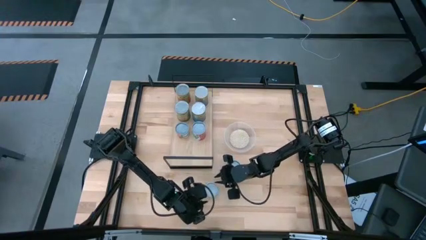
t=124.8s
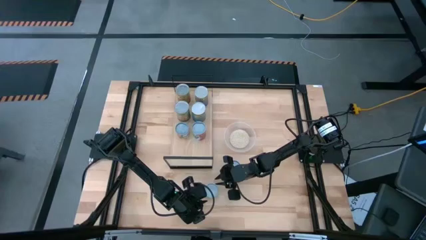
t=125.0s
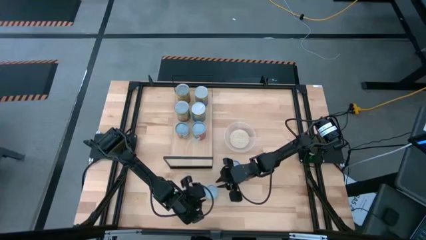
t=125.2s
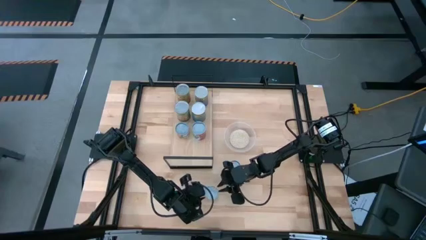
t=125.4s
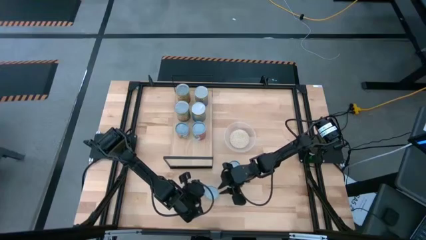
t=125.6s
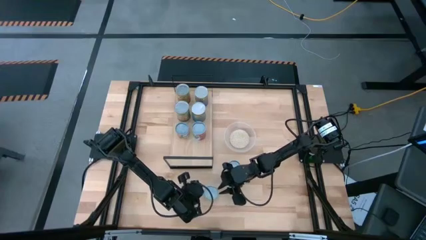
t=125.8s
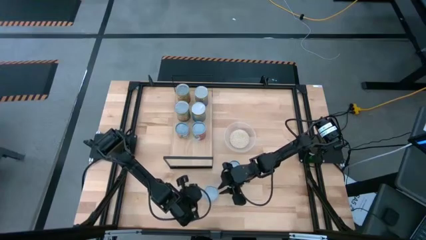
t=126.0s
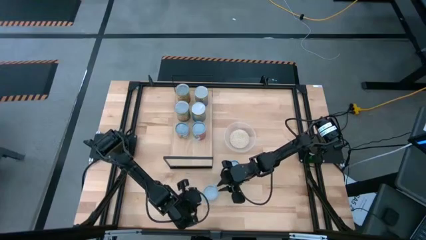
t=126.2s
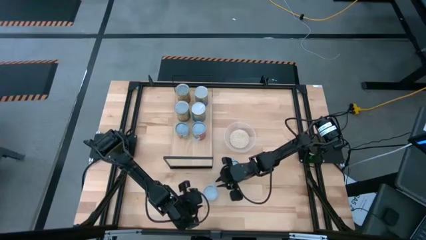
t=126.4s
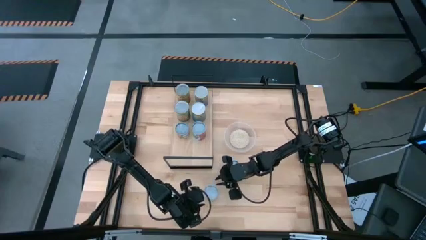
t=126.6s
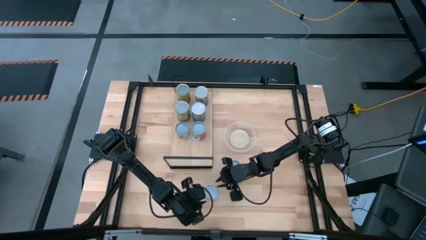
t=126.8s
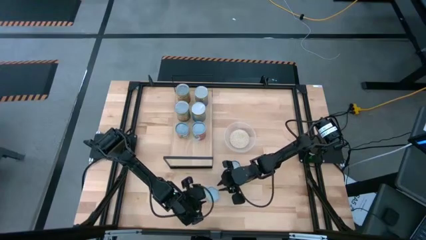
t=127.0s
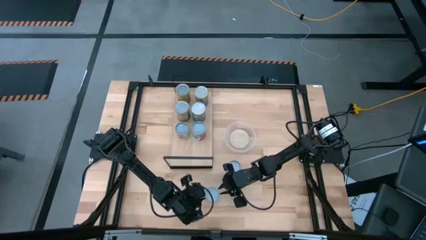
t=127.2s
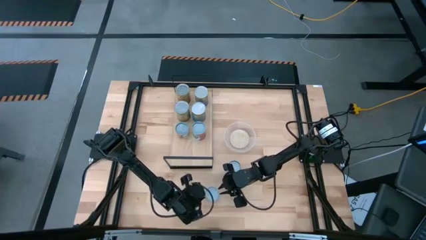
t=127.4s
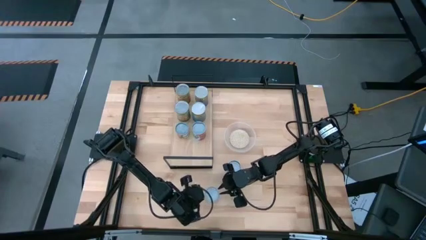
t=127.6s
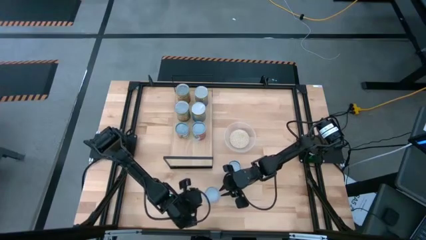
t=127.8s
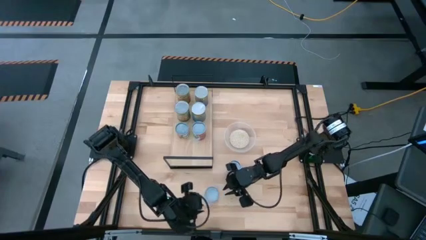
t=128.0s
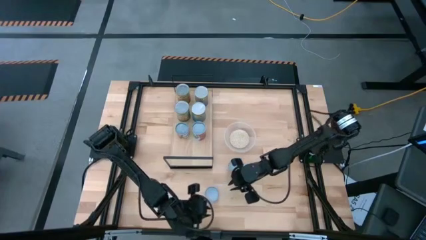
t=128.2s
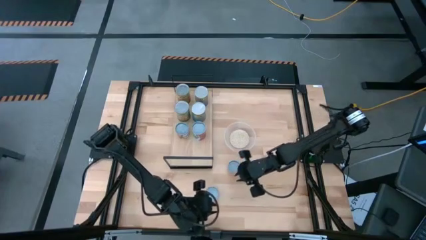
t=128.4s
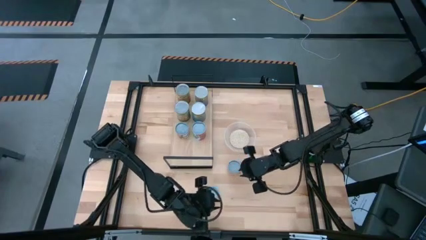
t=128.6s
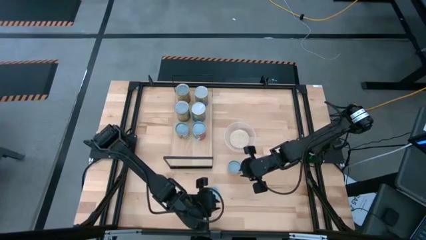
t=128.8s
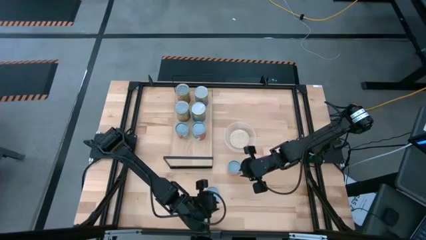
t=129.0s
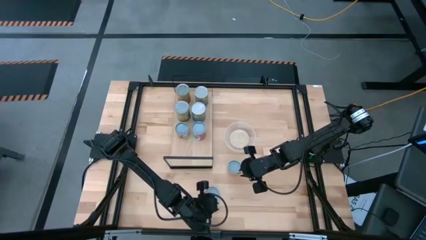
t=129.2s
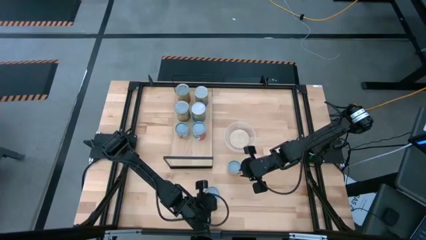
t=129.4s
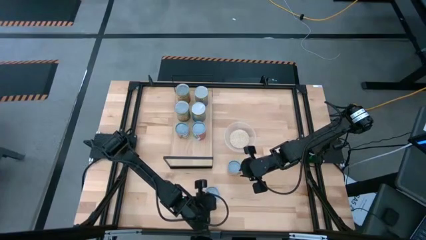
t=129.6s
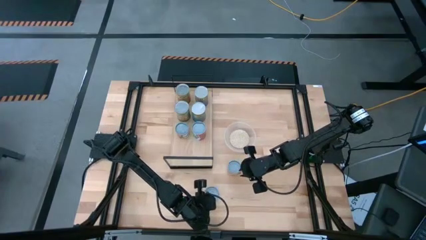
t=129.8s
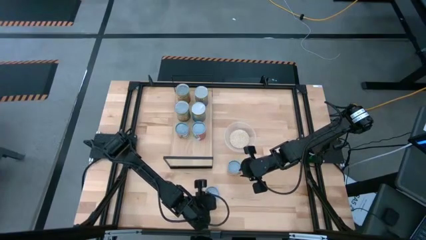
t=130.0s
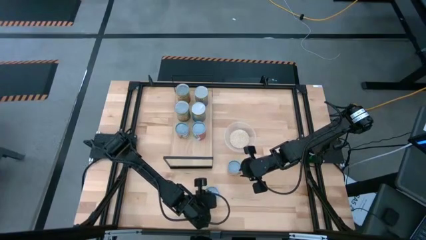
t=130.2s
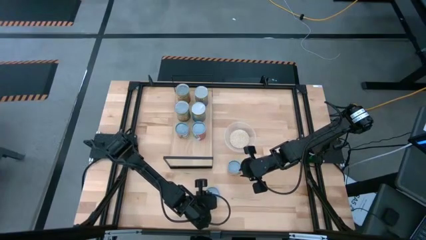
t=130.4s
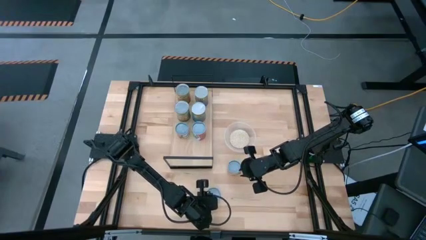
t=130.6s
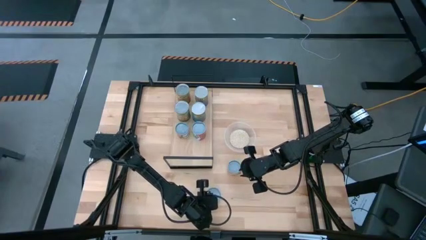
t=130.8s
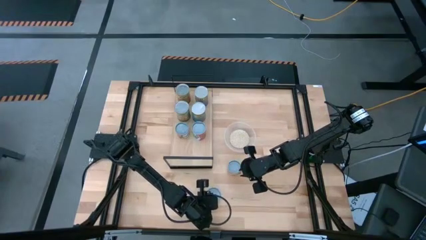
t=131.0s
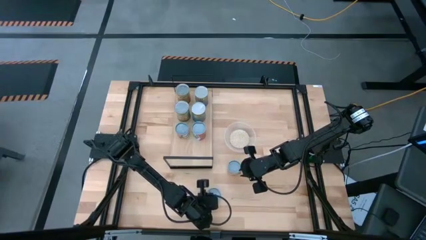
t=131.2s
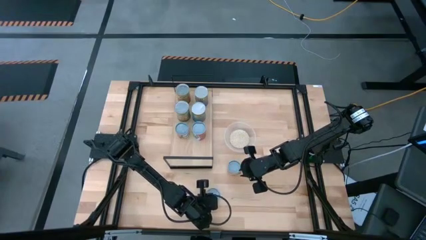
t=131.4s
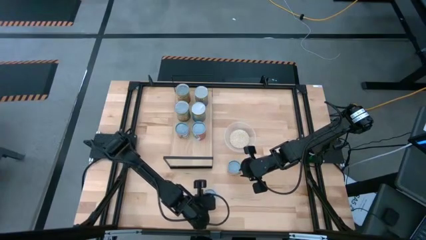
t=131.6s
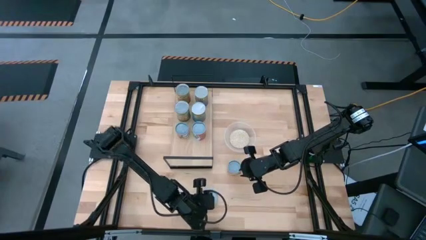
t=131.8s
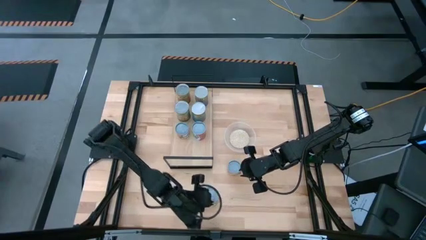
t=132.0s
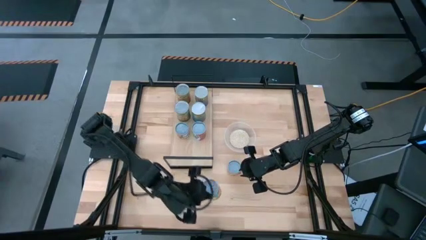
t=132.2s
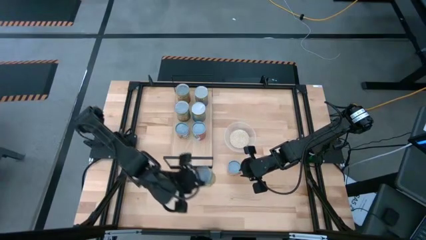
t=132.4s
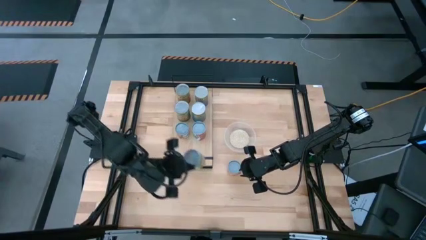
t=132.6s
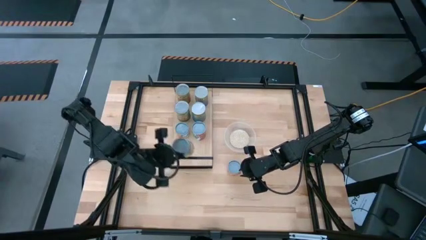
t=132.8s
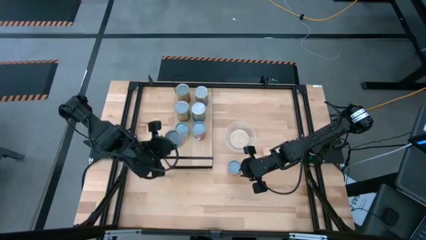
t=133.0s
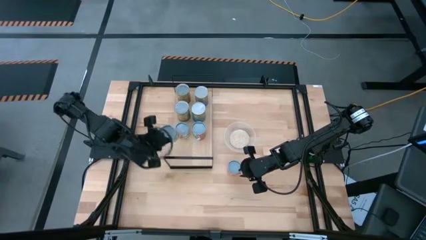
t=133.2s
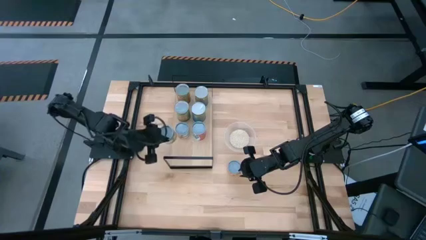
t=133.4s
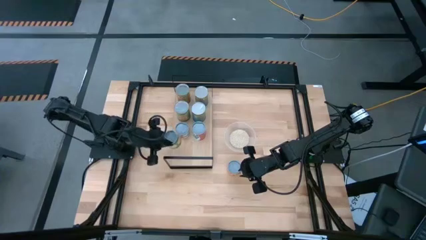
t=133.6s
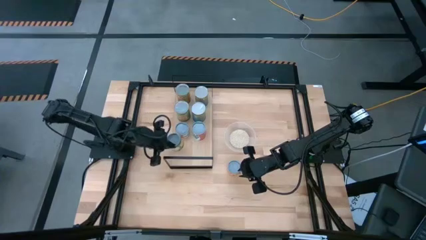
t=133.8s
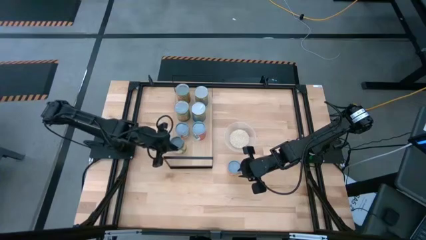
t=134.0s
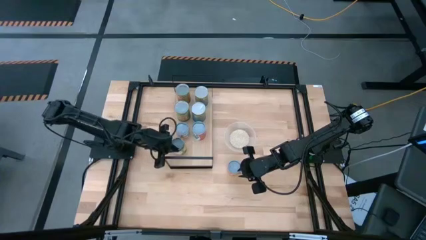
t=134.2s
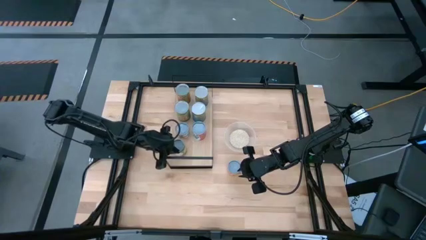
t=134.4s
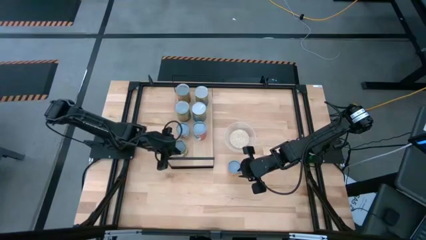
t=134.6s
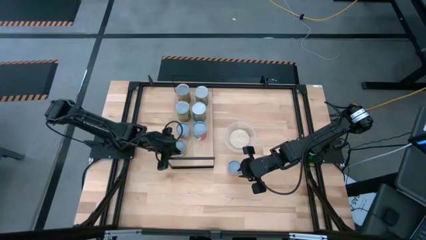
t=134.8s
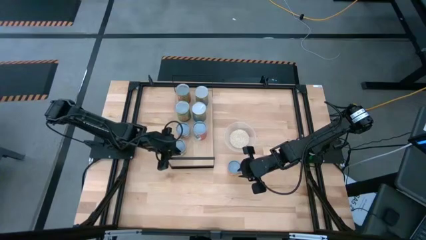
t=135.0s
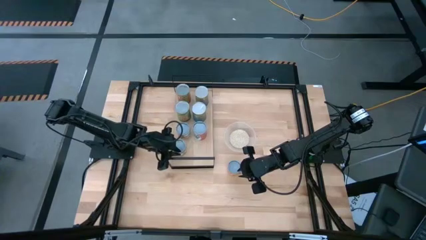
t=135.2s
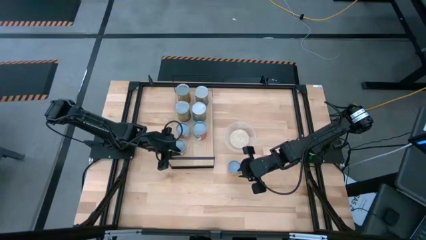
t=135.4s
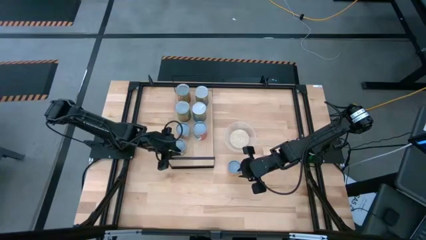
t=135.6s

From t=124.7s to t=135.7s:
Task: Pick and place cans onto a shelf
Put the small canned peaches on the shelf
